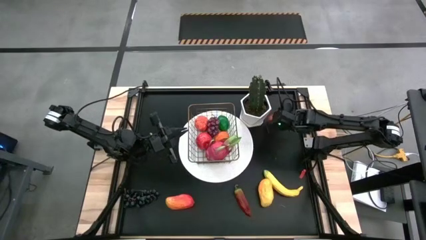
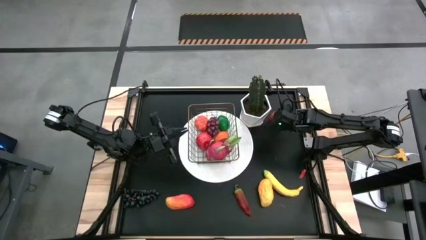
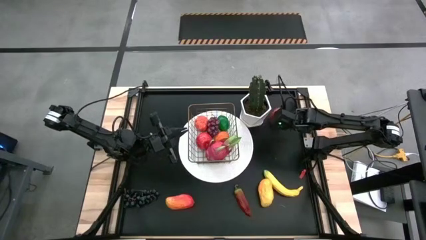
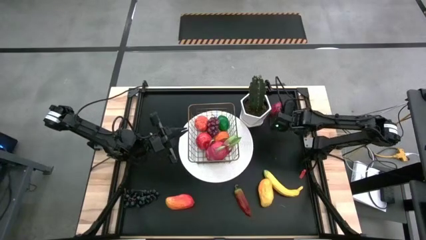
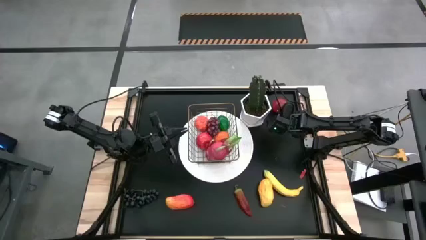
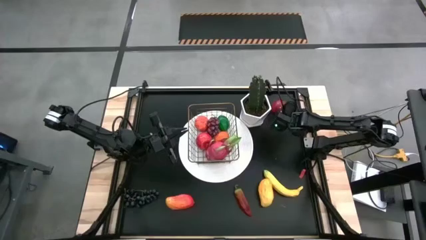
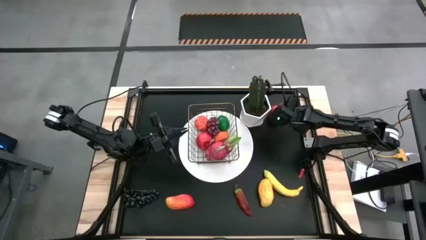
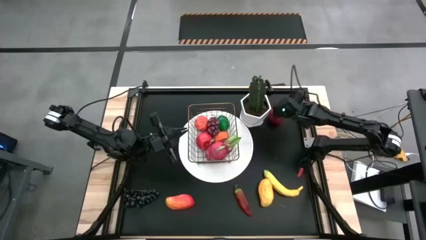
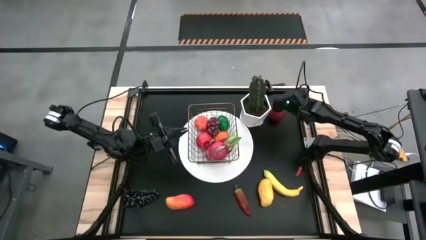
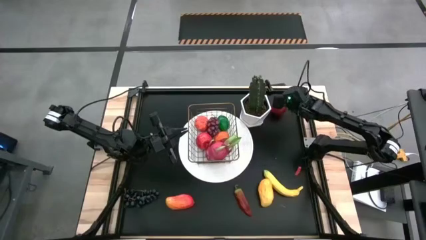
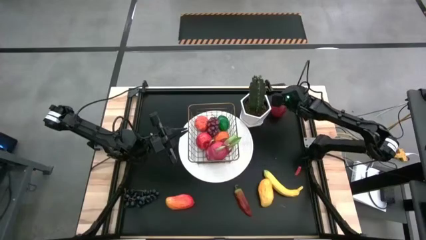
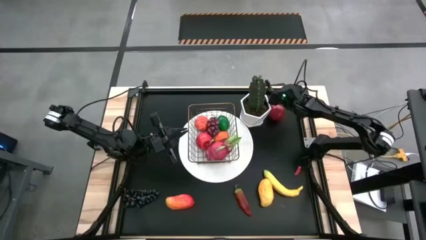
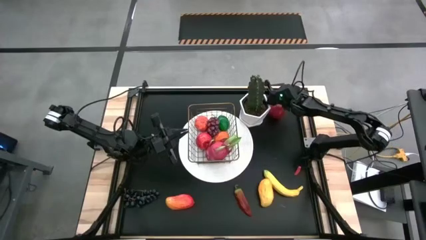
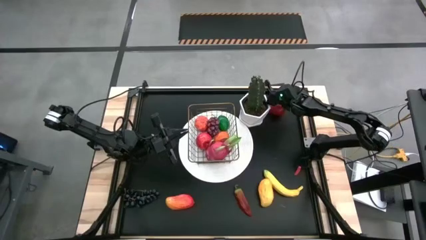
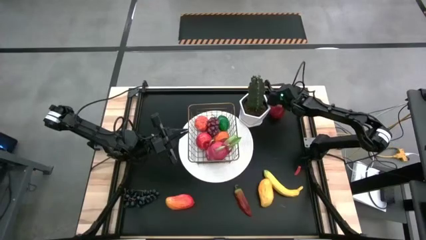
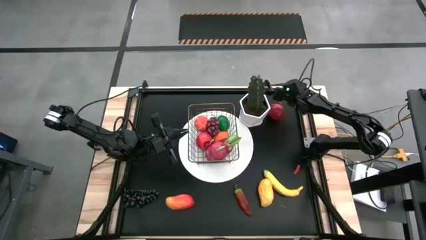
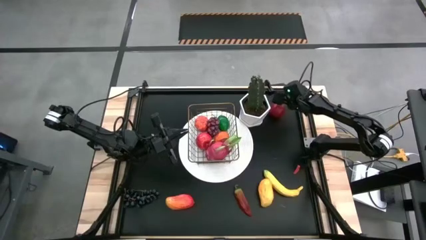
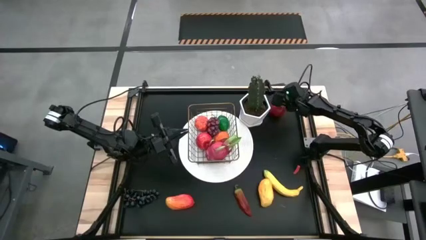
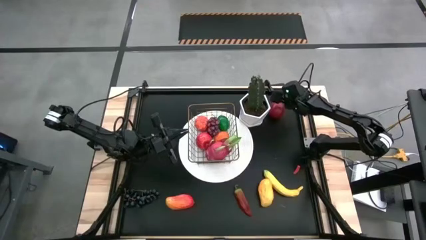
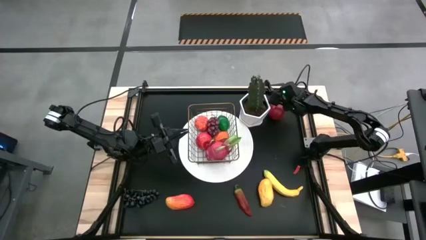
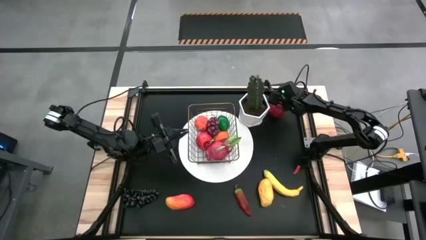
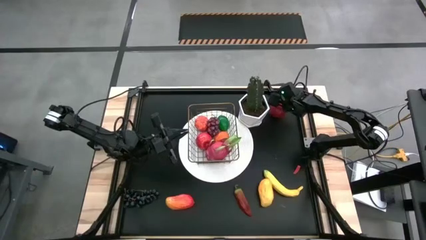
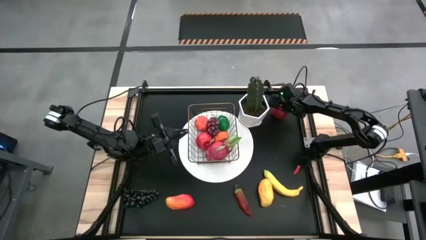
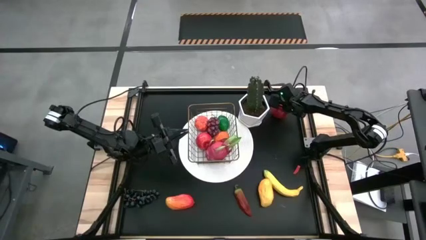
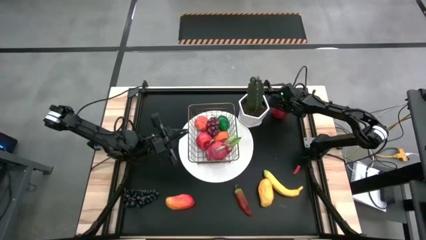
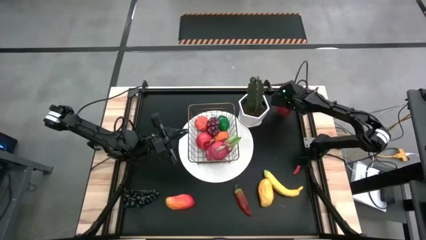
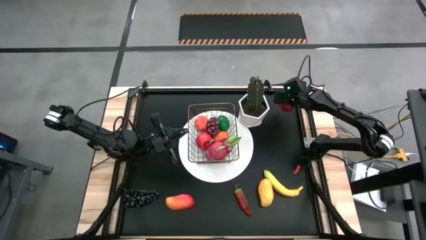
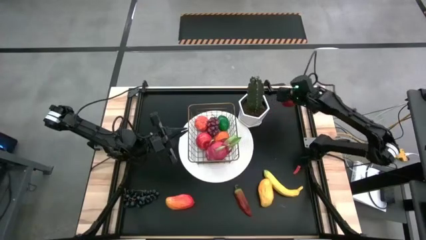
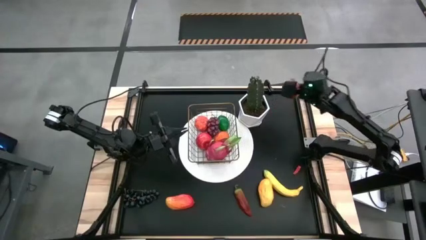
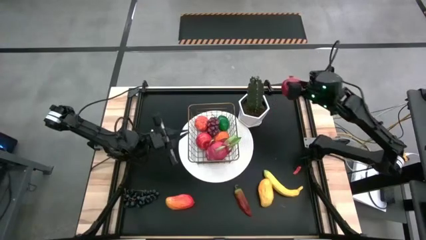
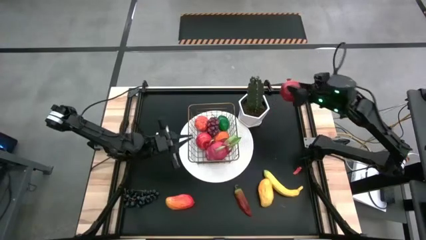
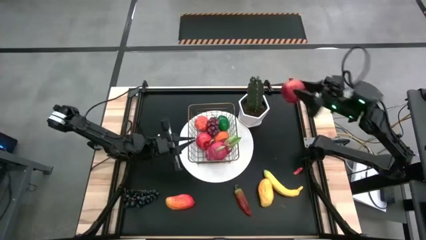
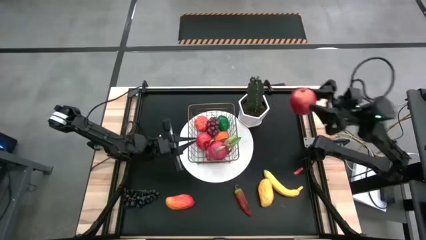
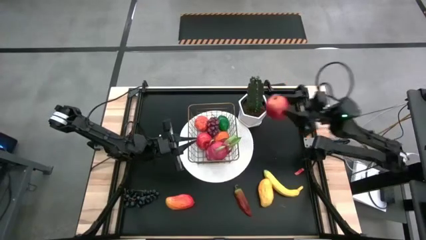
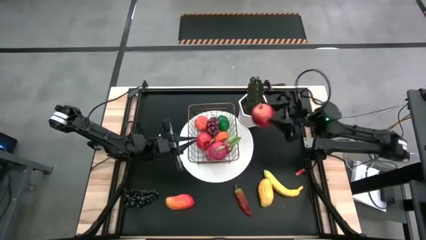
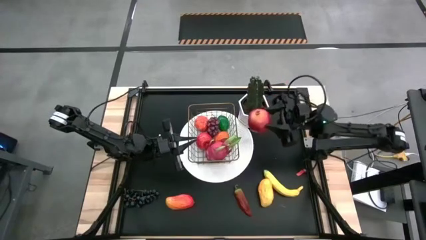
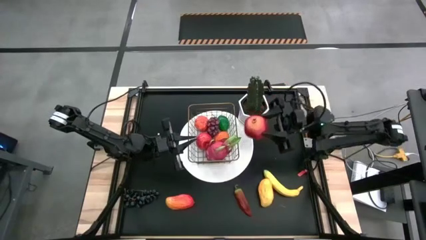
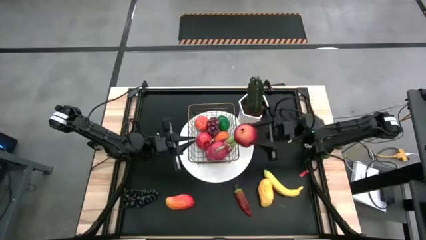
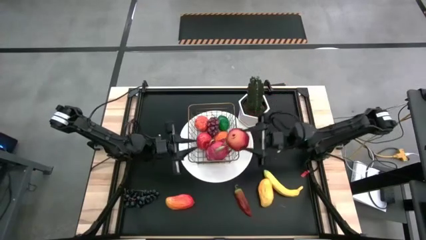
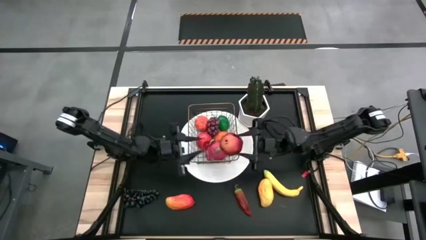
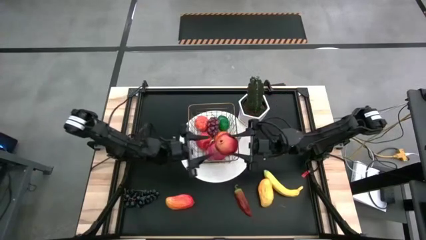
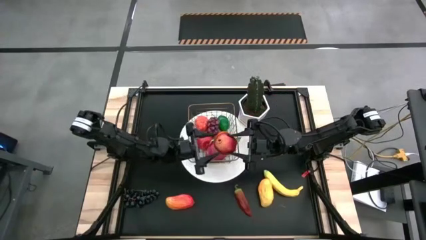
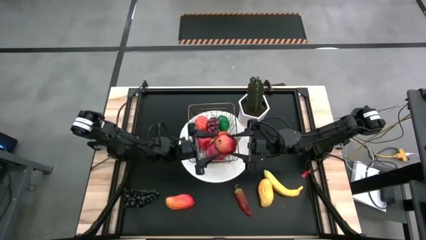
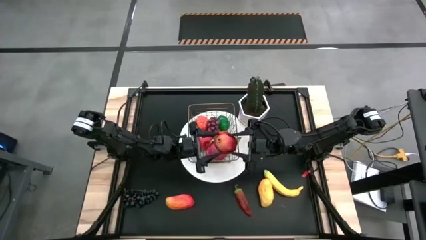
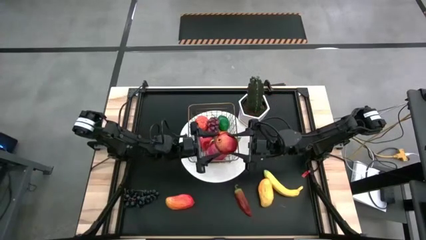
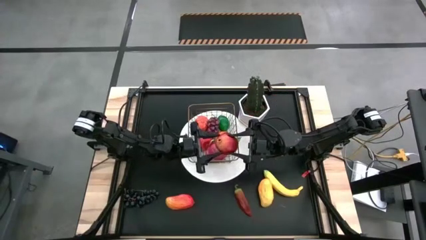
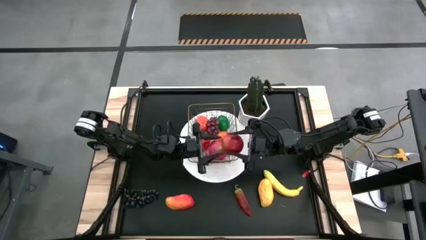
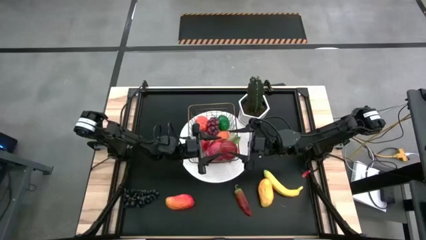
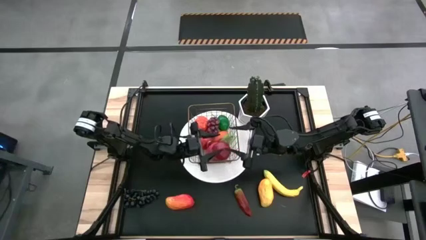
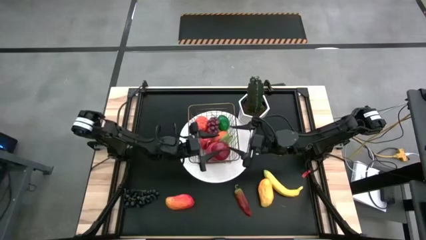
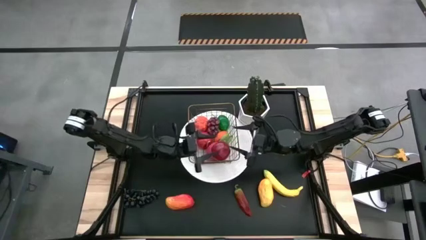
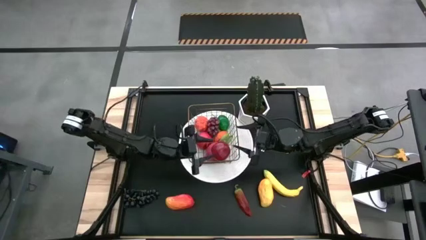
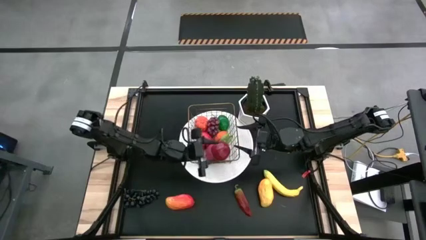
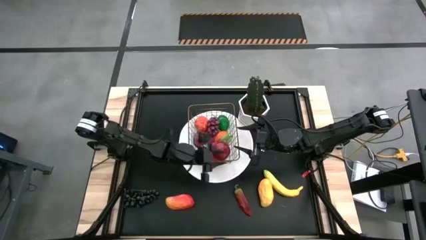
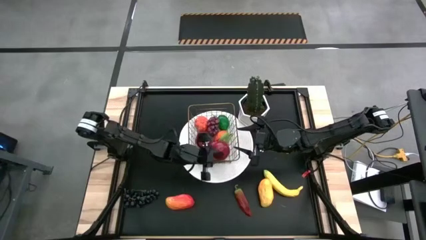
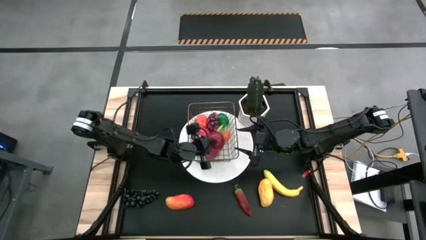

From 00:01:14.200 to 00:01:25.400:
Task: Build produce basket
Put the pomegranate into the gold wire basket

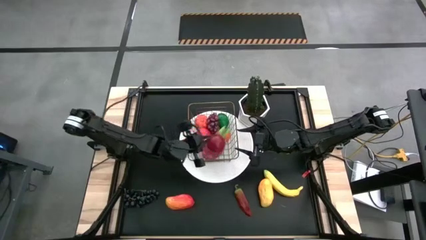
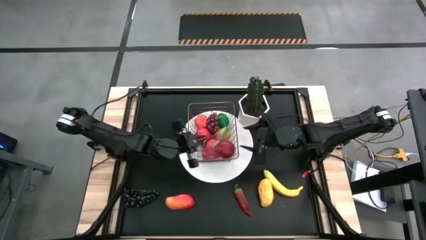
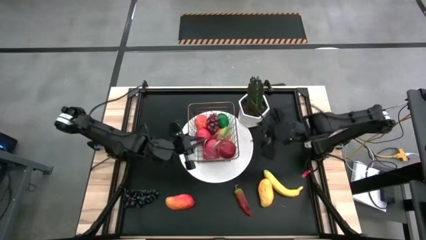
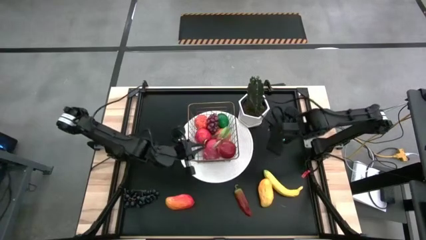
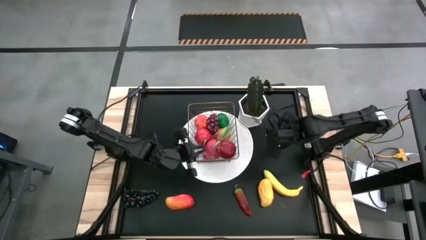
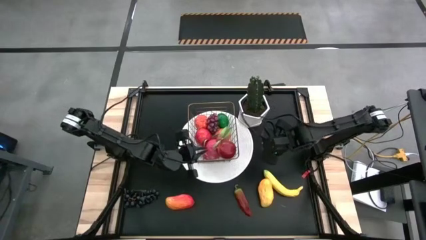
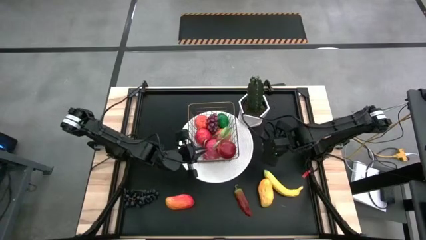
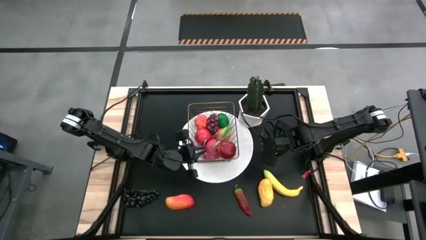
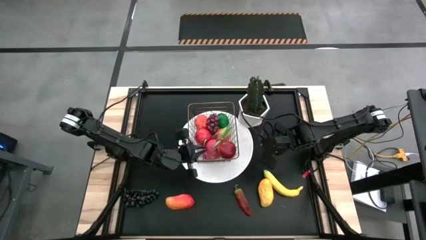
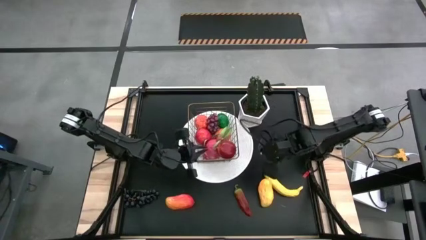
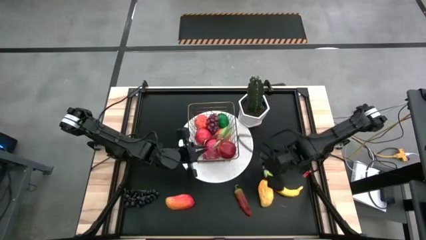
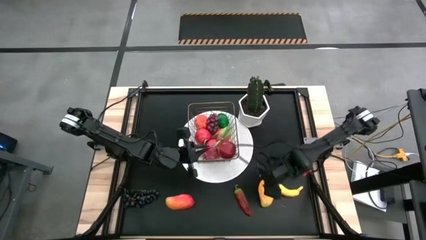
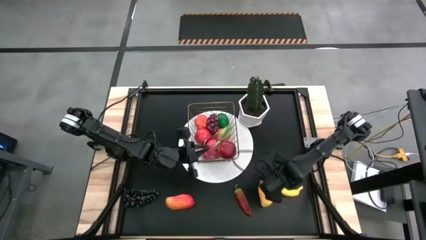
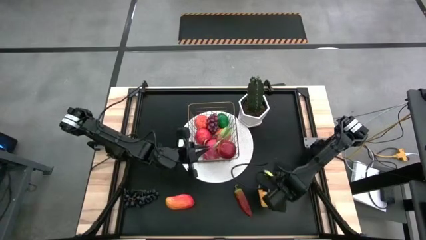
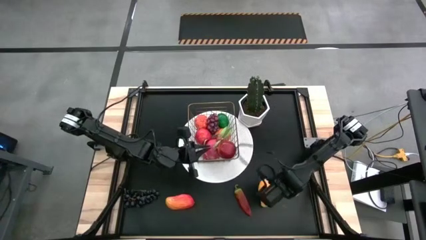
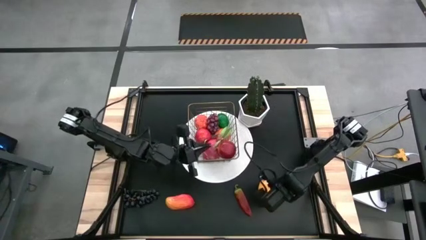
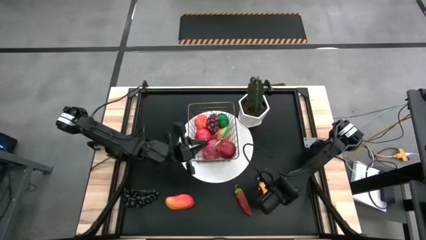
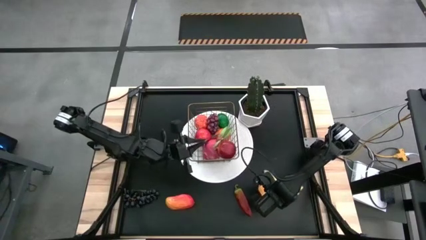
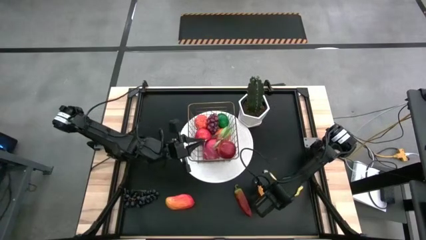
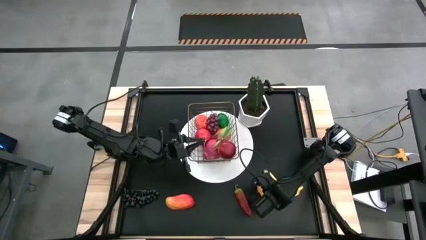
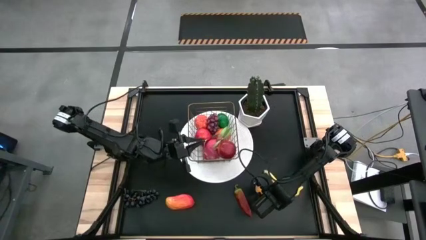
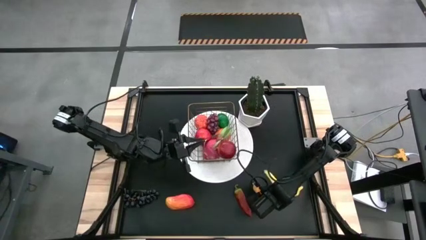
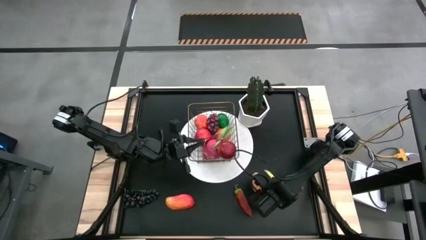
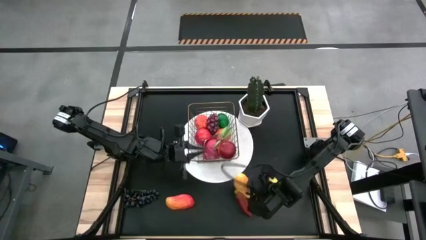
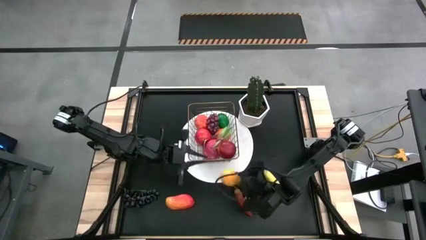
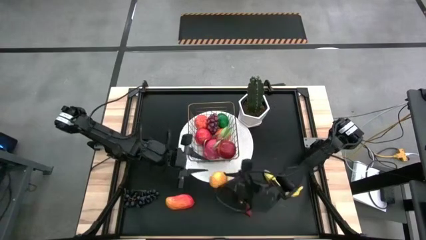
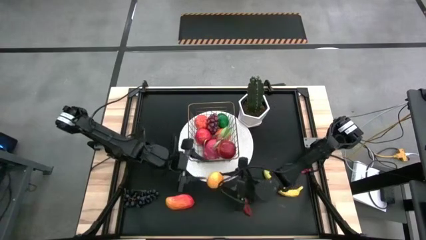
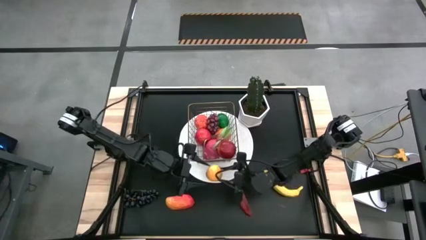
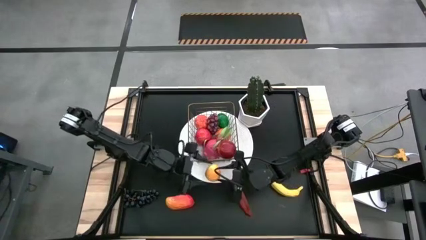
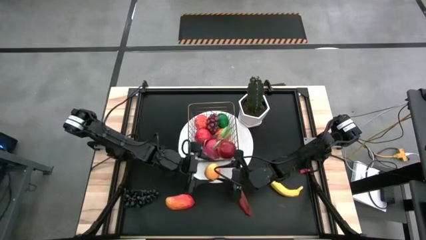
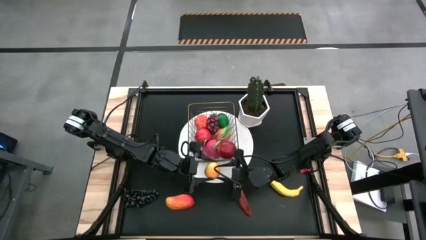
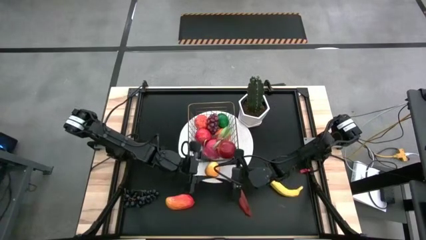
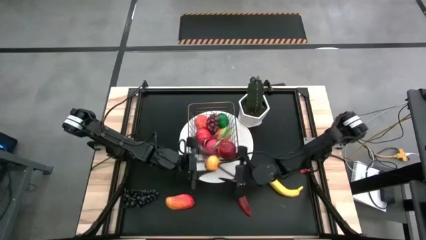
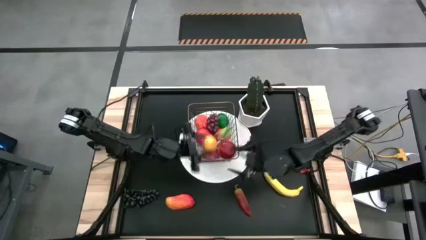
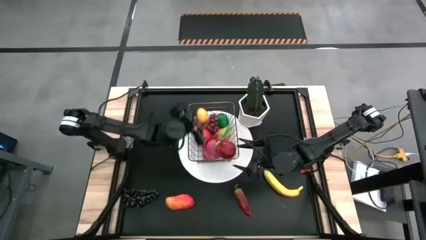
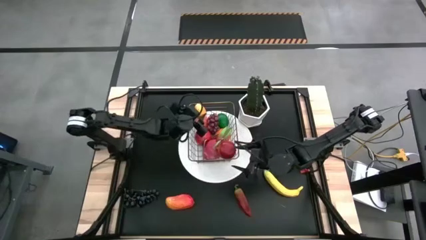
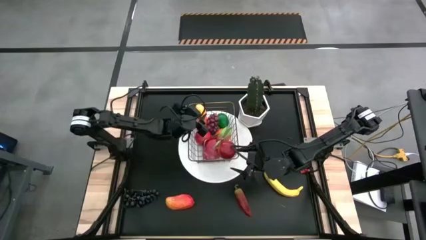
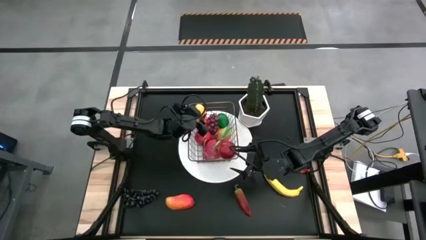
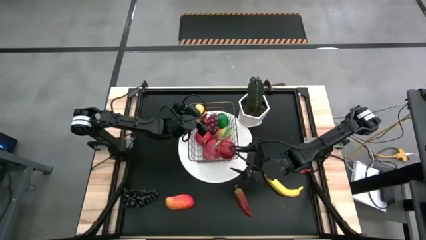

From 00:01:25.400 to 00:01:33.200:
Put the yellow mango into the gold wire basket
